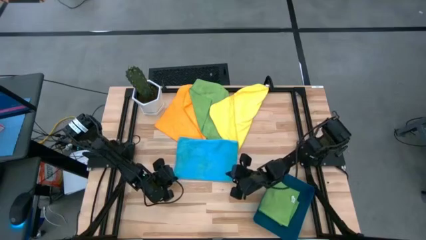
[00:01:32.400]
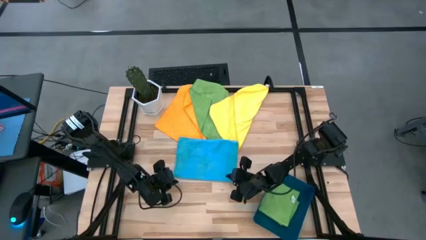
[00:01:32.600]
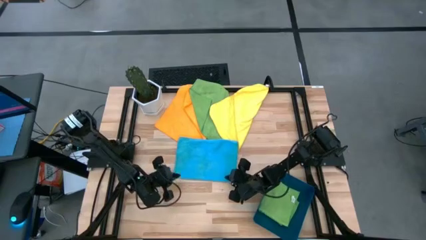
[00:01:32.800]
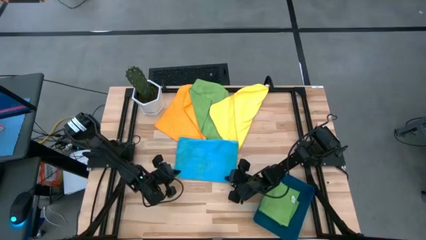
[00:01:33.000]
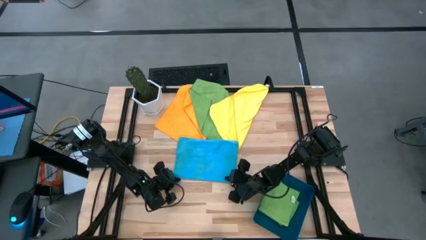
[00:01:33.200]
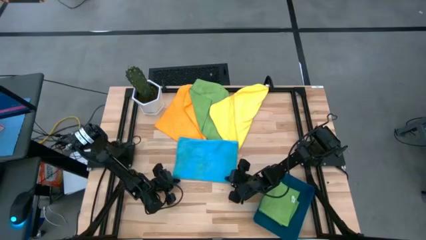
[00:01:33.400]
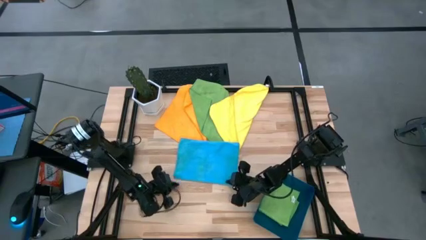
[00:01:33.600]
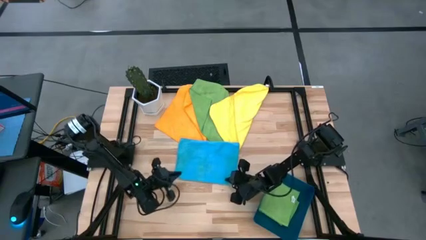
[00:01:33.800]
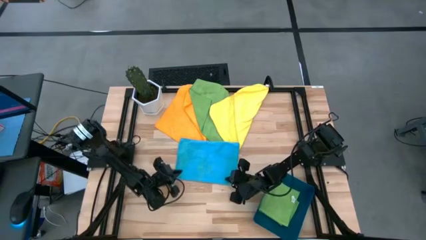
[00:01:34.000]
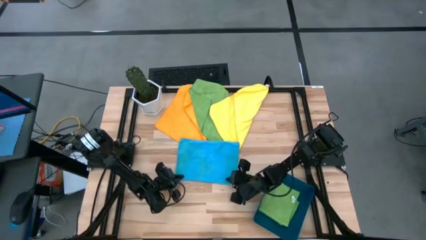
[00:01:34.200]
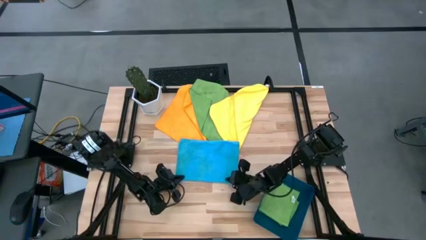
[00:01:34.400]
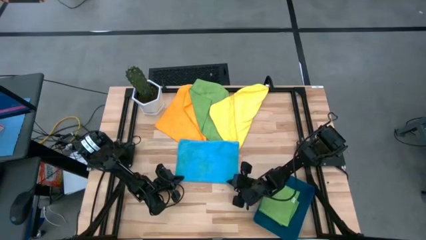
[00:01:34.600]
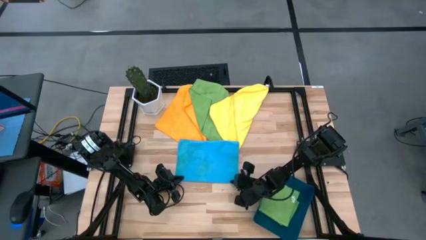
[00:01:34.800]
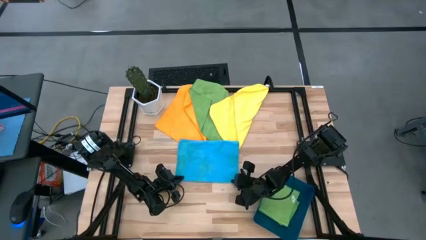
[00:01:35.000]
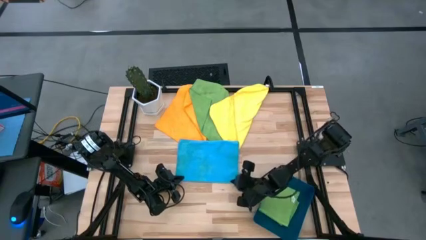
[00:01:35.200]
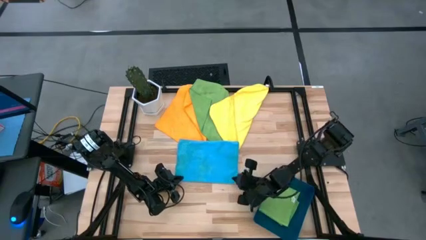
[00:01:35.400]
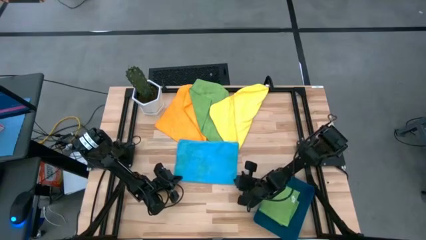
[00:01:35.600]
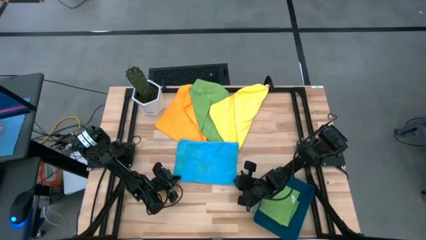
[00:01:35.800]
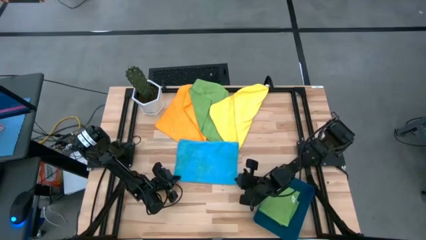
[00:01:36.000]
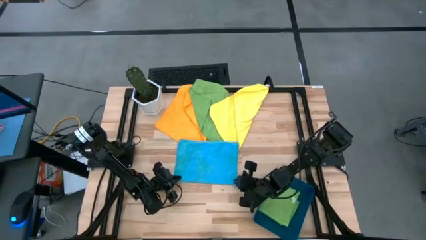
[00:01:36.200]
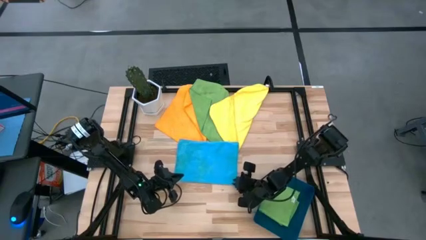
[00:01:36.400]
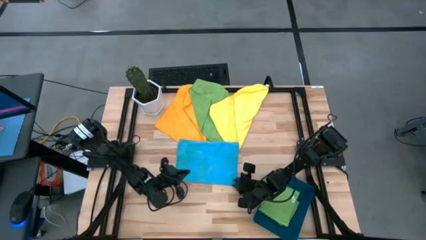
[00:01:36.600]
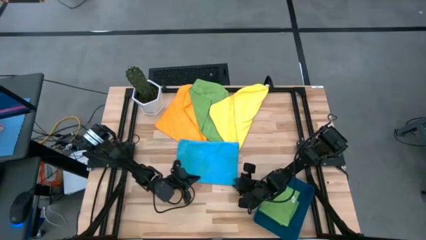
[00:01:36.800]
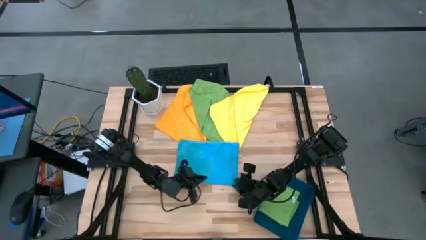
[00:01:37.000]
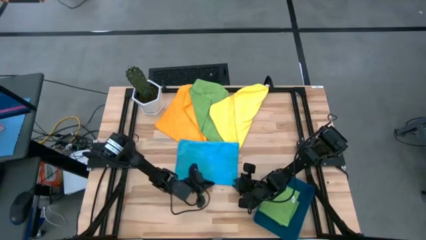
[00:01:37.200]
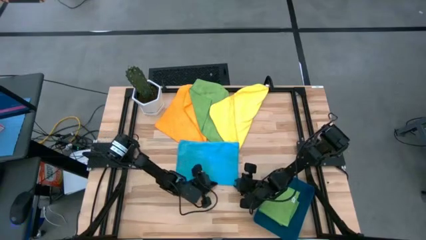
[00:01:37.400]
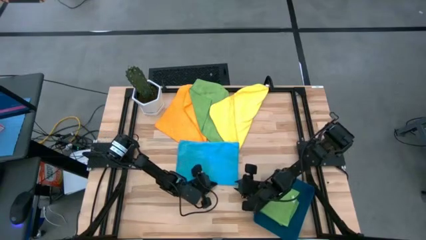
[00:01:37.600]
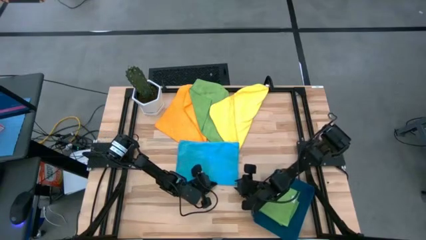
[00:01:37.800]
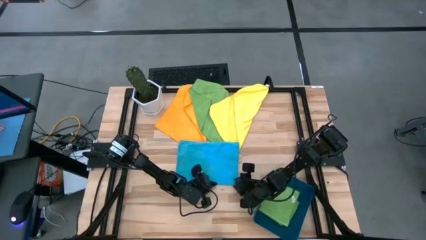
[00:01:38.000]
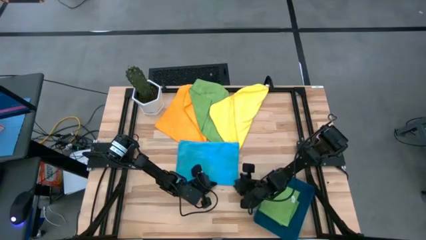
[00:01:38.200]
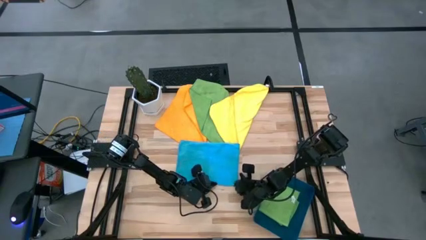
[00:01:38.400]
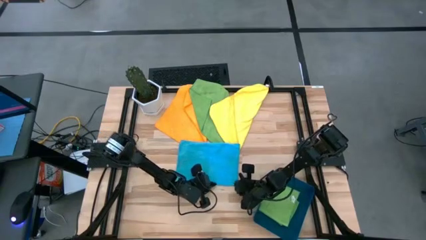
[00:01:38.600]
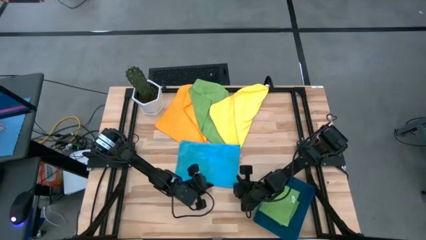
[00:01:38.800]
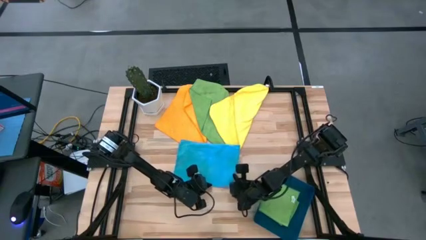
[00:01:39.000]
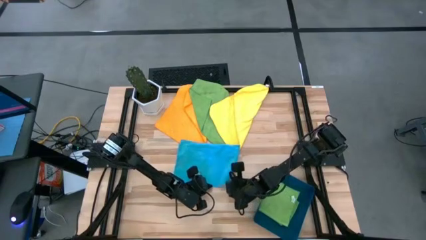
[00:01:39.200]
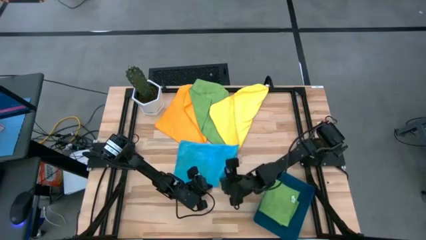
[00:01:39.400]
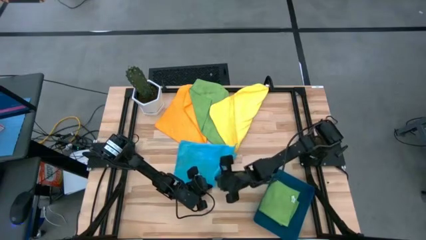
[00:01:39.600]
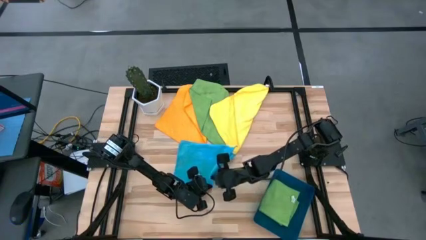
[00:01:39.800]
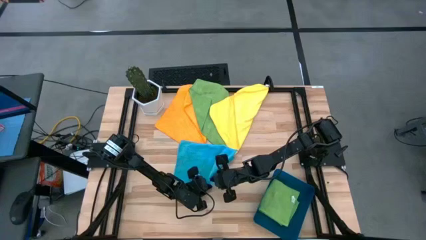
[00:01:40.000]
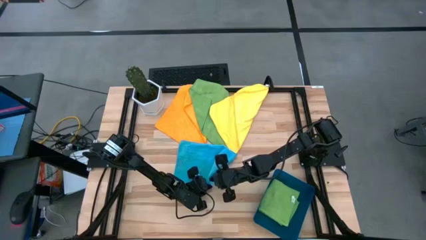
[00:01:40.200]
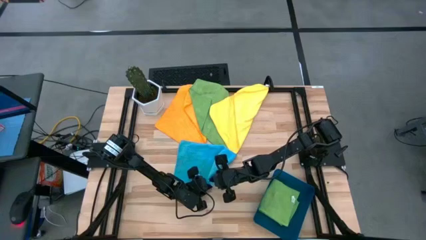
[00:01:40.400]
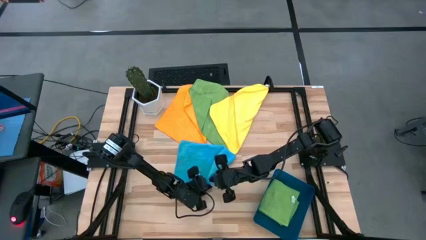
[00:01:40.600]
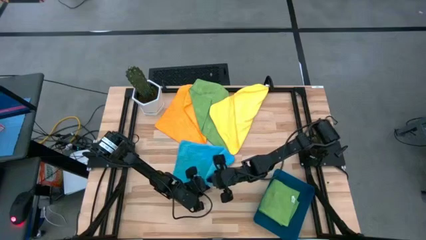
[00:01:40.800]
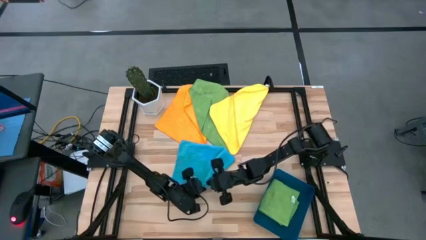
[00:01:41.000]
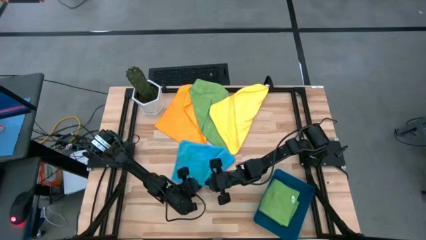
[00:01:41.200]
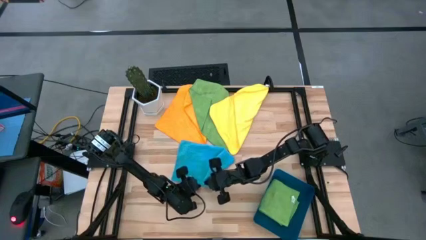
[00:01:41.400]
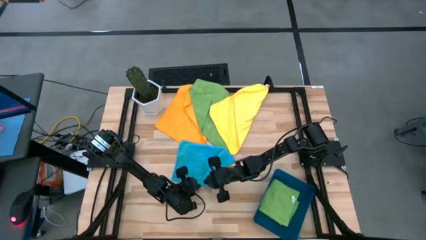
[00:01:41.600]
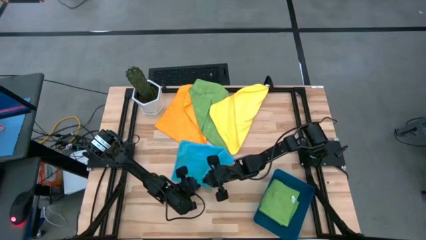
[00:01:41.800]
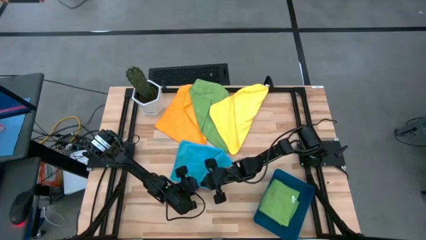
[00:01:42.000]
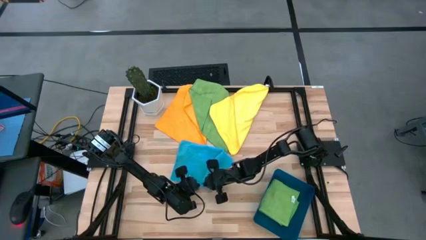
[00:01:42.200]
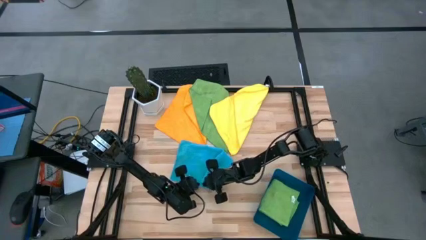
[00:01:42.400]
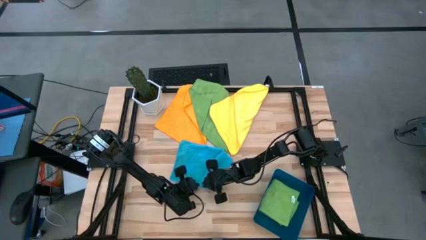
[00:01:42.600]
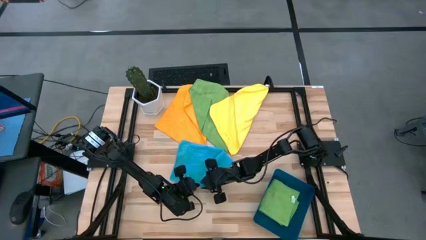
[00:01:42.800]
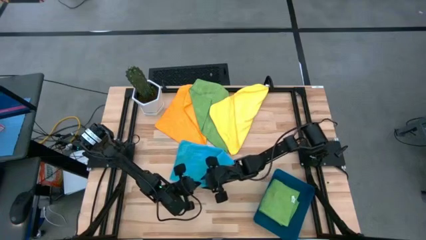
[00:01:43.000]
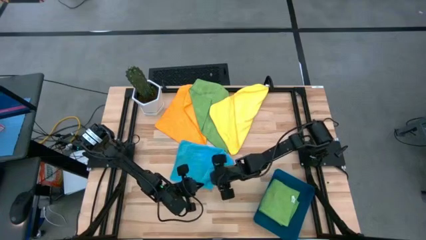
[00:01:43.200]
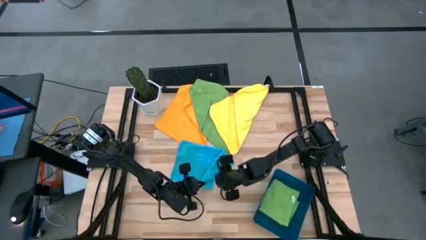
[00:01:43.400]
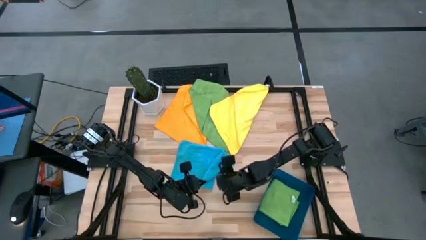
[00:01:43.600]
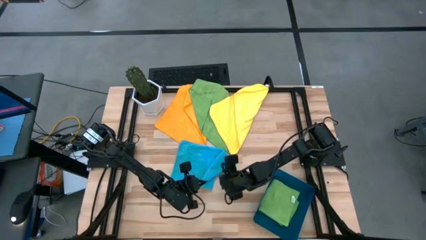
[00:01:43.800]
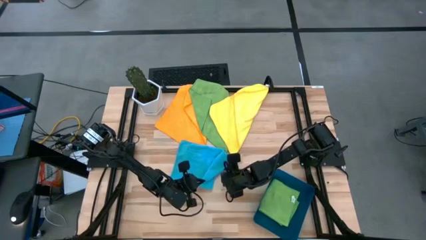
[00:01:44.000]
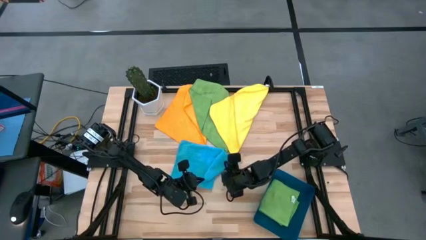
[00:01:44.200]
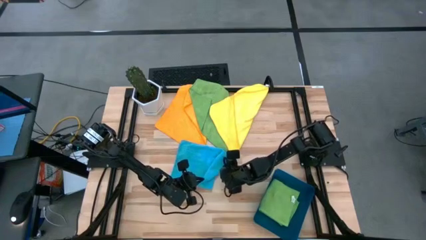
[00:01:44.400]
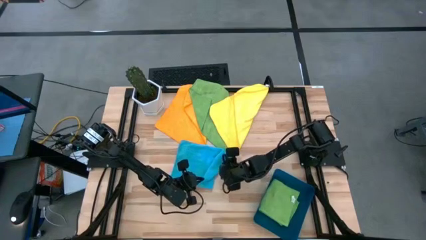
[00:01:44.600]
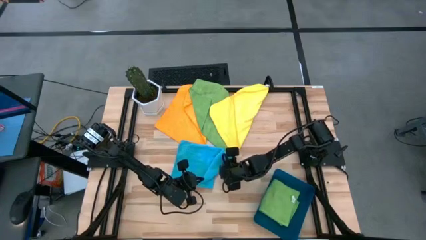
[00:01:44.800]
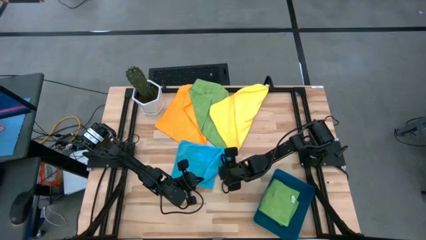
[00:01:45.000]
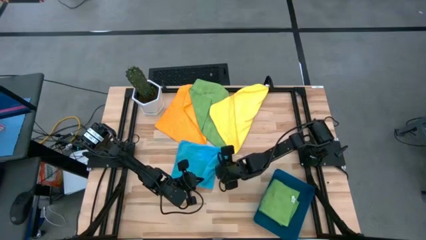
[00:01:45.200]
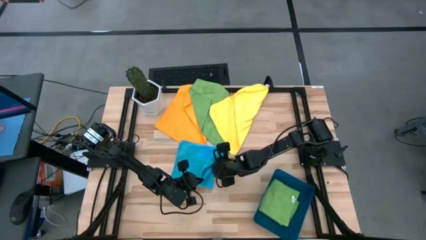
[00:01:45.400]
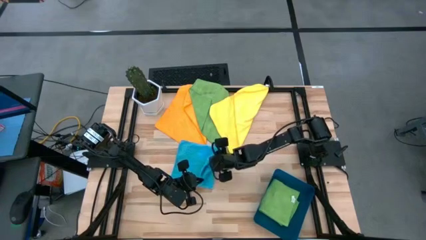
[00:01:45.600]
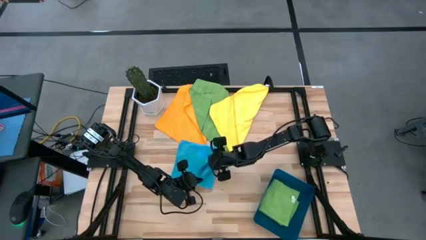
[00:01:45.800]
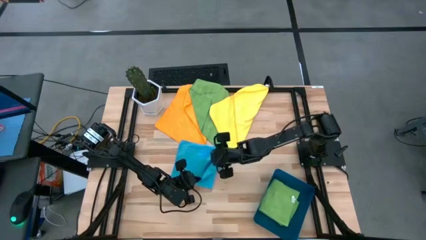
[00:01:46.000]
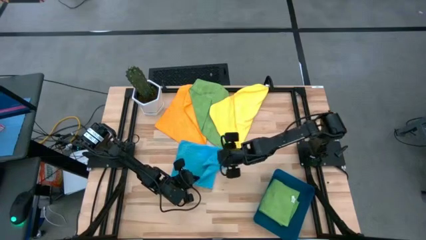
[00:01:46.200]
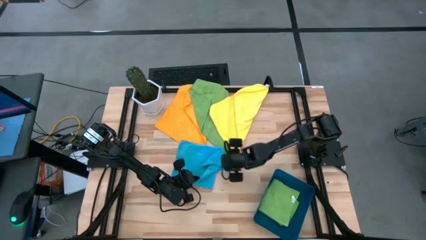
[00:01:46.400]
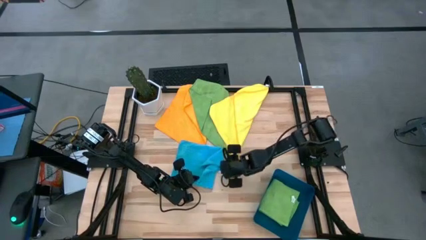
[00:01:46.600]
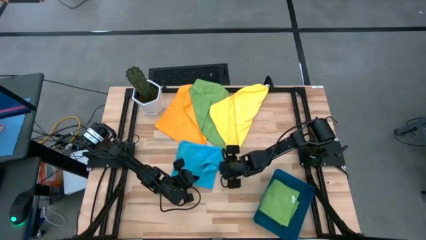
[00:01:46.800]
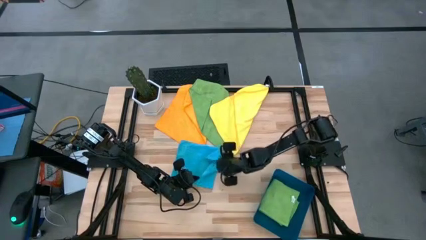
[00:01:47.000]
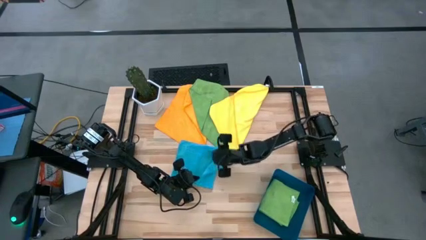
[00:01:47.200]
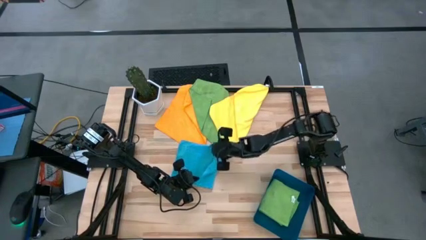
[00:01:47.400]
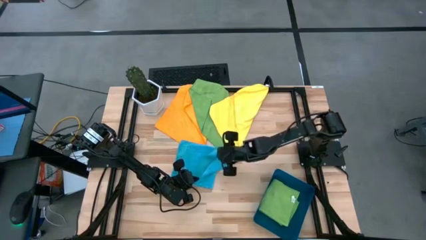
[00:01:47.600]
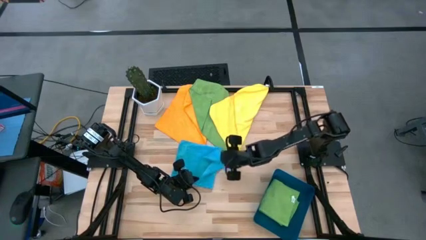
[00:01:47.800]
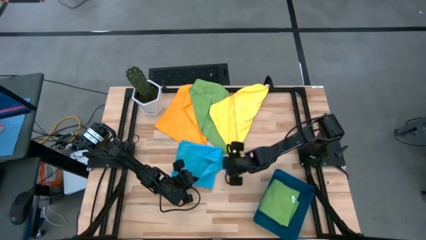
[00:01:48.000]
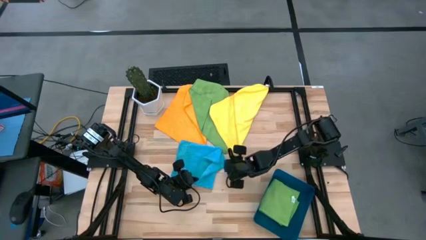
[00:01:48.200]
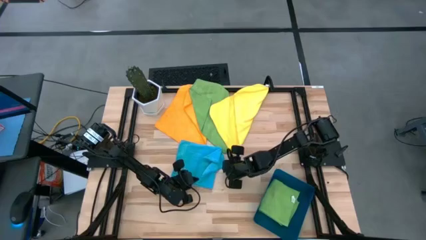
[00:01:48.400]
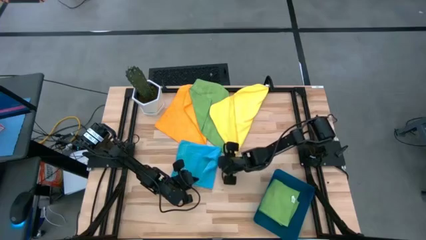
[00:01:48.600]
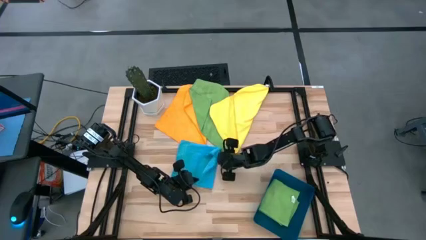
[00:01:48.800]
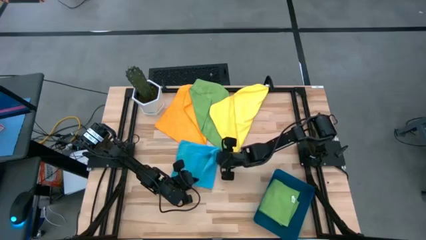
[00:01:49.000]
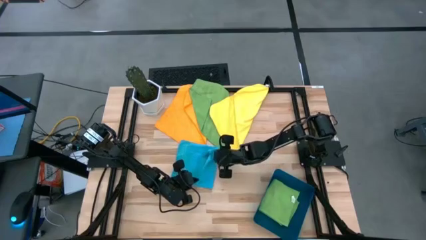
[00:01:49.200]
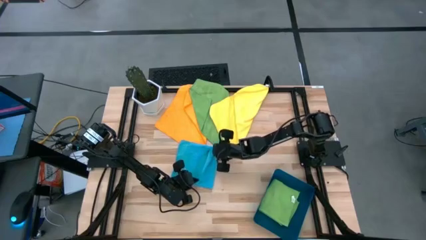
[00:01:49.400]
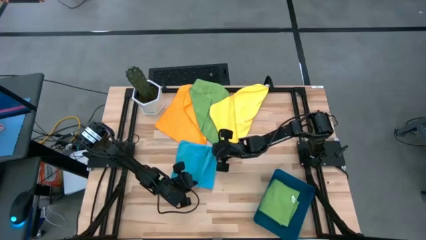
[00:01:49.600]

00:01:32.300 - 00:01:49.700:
Task: Fold microfiber towels
Fold the blue microfiber towel
